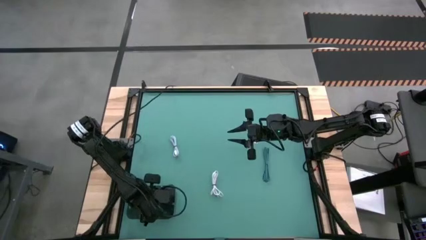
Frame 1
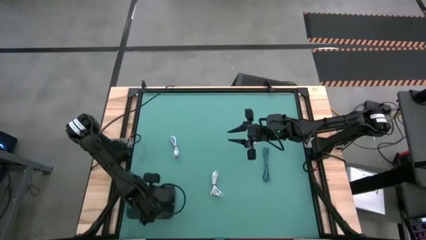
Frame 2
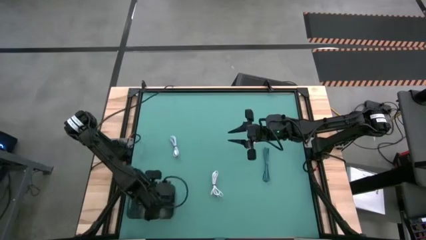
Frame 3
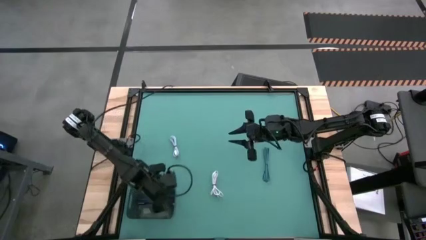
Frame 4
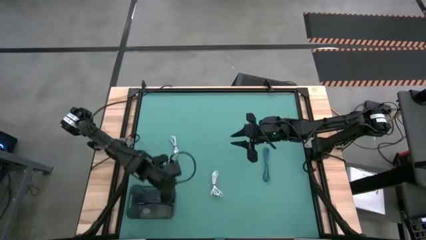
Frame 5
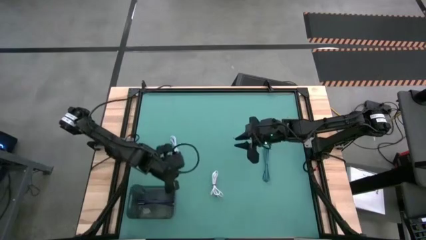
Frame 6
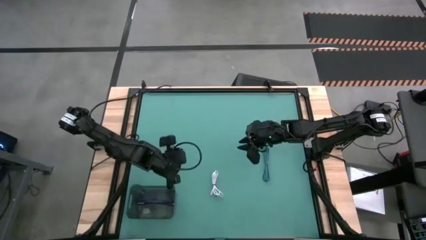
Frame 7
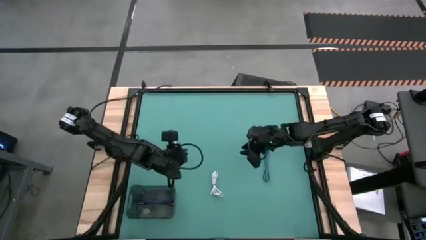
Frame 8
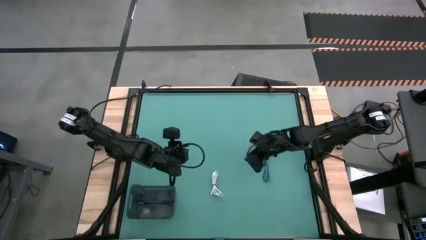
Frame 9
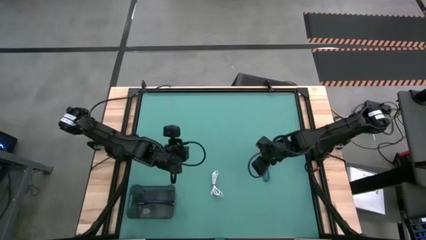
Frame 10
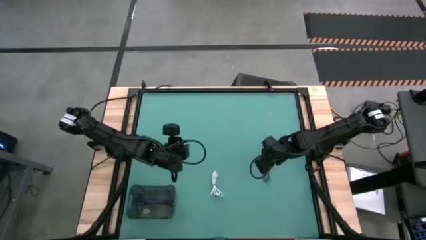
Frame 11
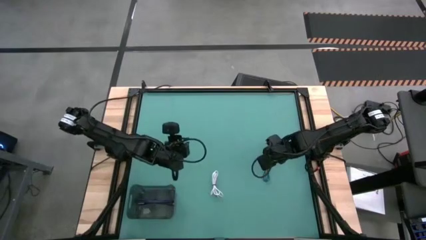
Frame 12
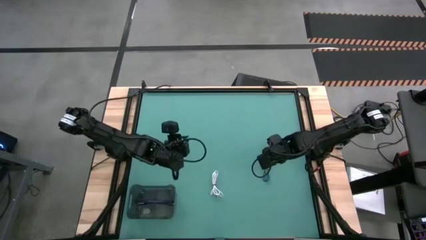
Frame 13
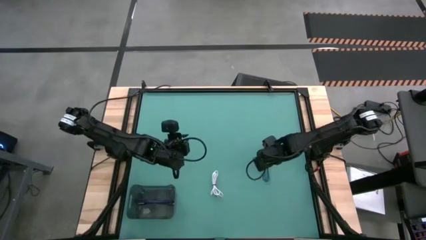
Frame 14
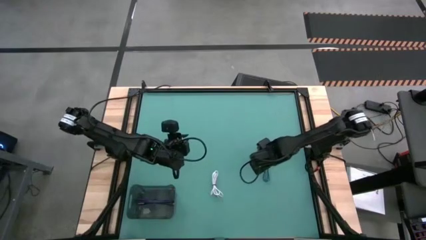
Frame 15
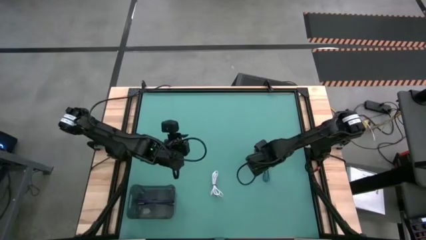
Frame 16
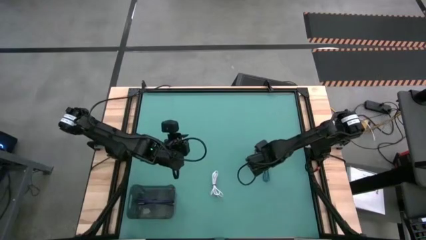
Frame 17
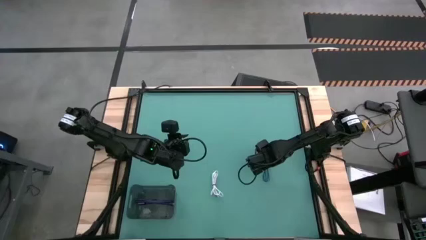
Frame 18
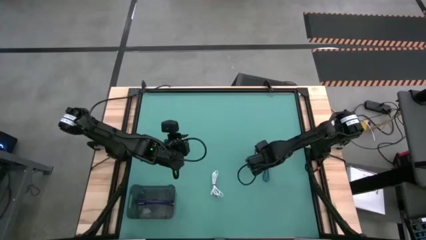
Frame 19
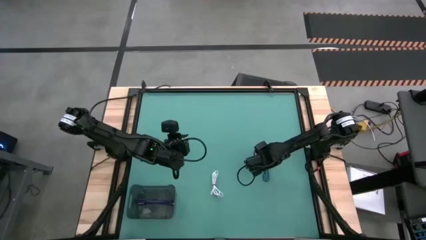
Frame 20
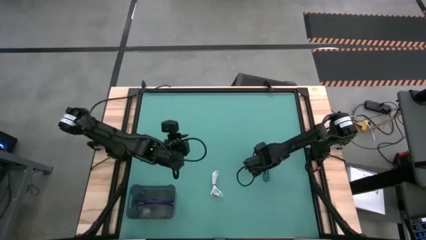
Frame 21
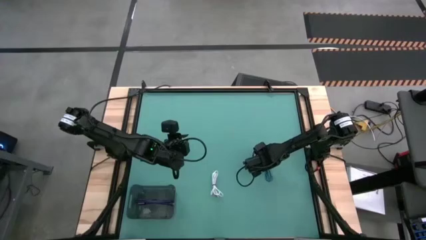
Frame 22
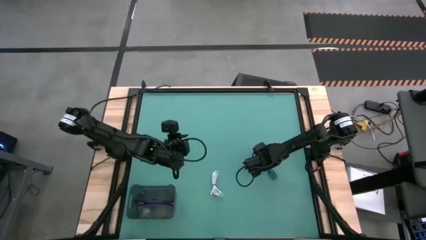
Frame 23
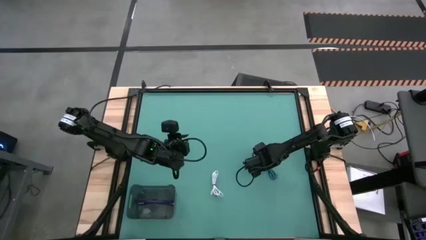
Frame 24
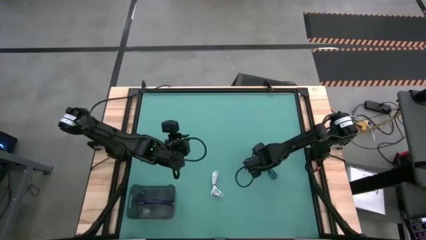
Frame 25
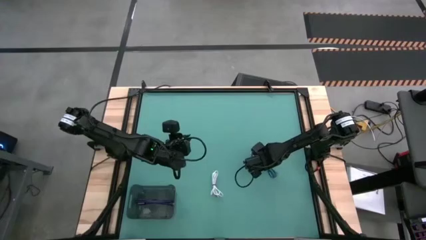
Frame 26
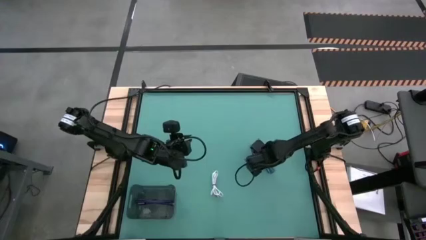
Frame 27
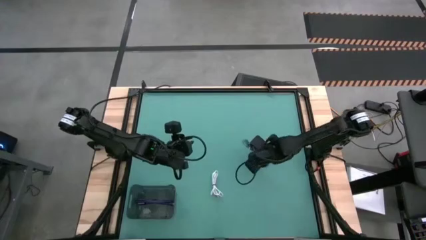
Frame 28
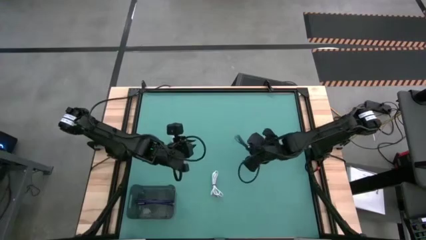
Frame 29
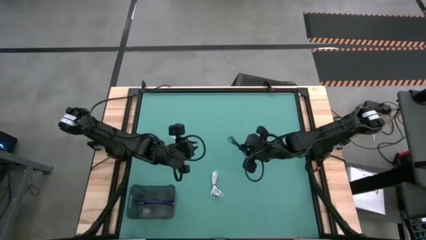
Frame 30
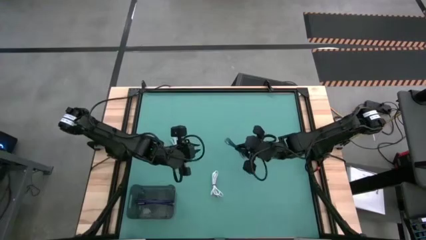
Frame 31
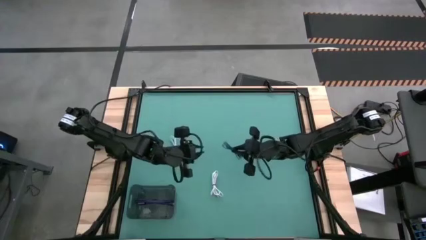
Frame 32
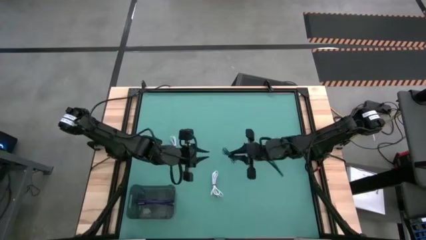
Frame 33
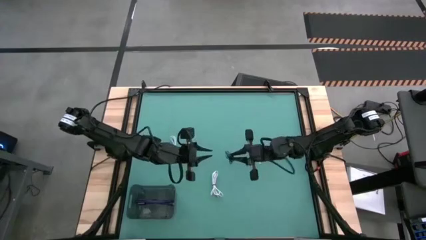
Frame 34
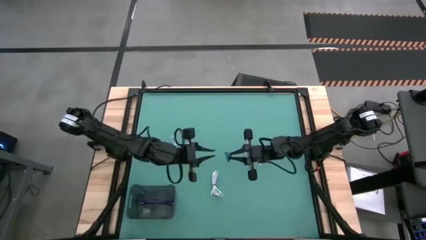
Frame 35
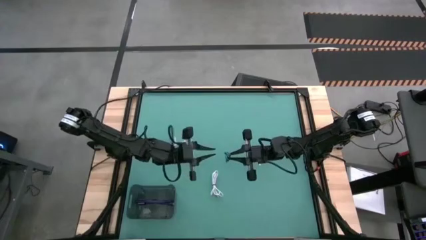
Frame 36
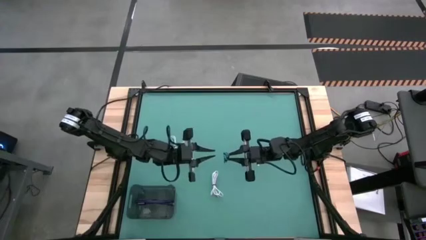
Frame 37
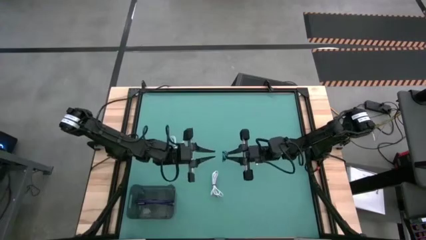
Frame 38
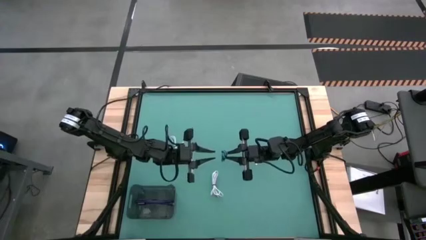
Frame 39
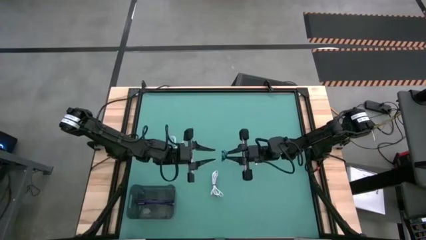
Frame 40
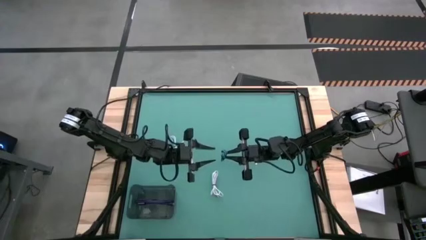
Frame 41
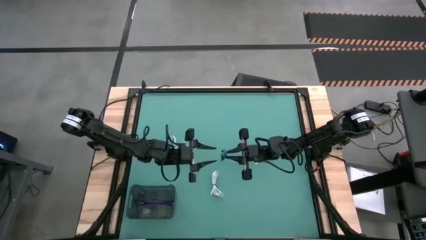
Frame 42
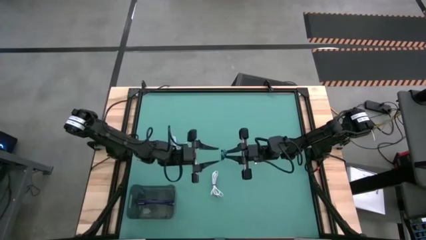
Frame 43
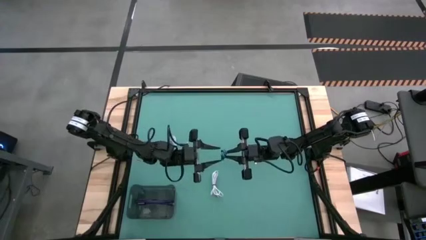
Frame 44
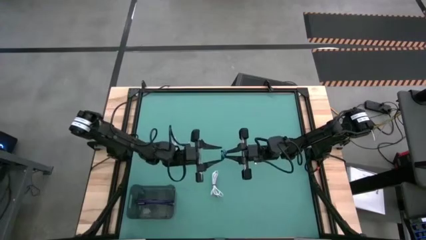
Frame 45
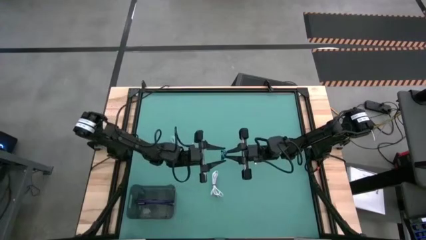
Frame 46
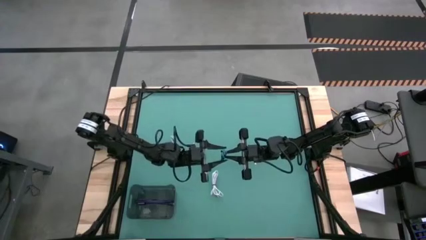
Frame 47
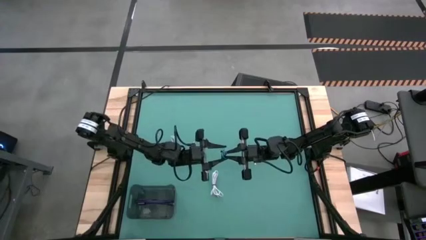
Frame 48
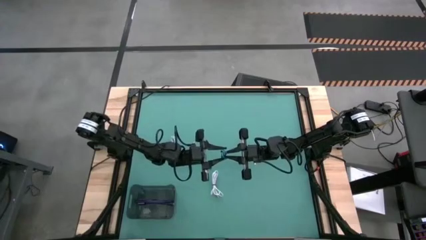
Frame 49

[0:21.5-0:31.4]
Task: Pick and place USB-C Cables
Put the blue black charger cable into the black bin
